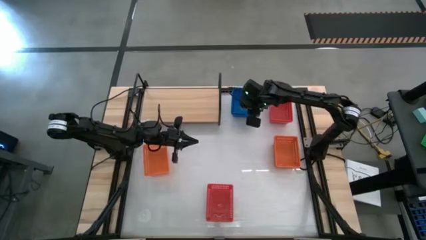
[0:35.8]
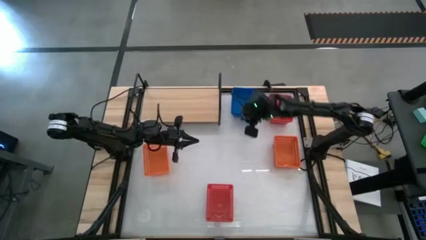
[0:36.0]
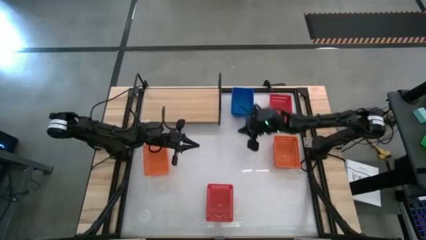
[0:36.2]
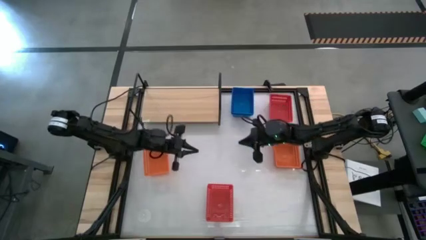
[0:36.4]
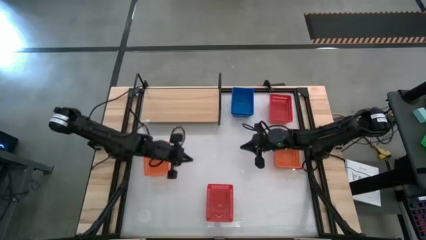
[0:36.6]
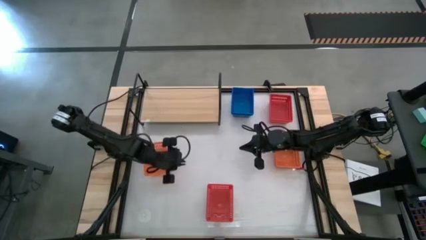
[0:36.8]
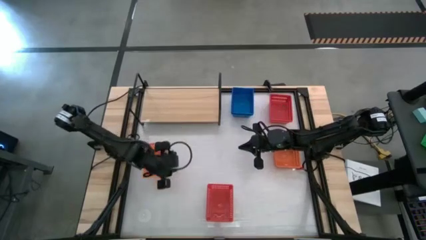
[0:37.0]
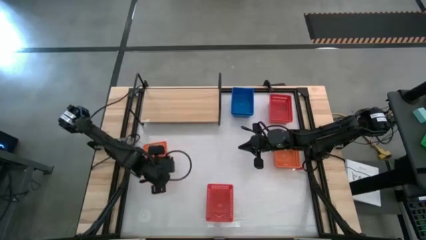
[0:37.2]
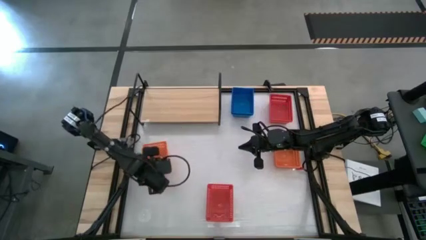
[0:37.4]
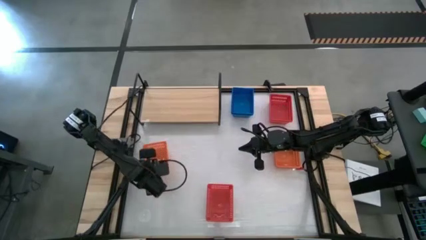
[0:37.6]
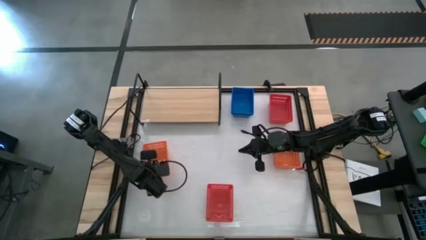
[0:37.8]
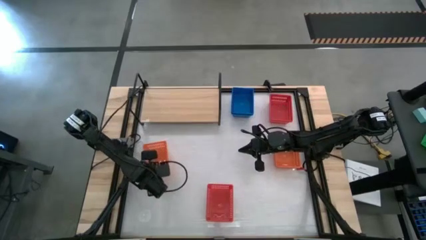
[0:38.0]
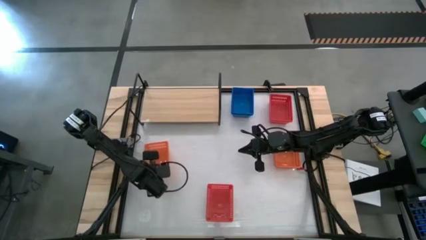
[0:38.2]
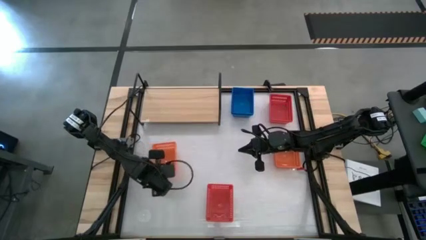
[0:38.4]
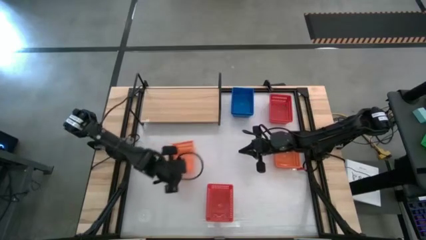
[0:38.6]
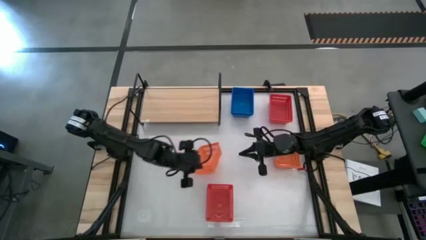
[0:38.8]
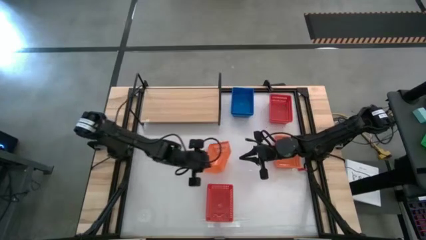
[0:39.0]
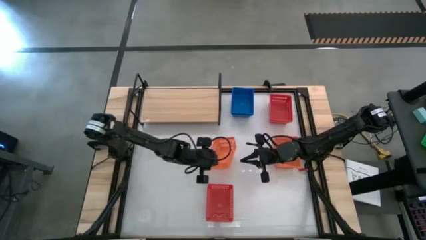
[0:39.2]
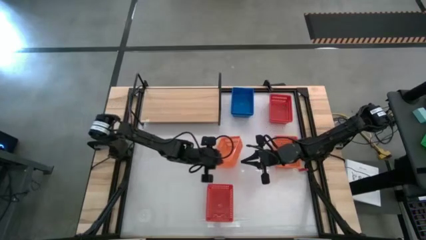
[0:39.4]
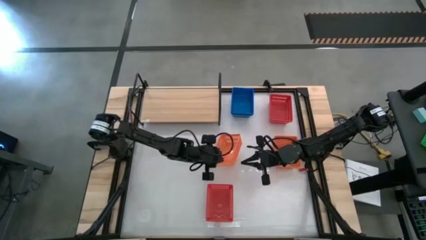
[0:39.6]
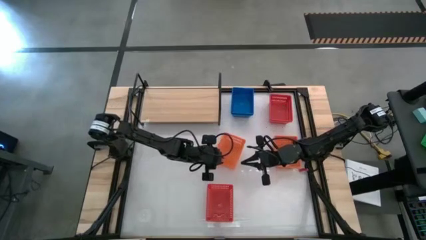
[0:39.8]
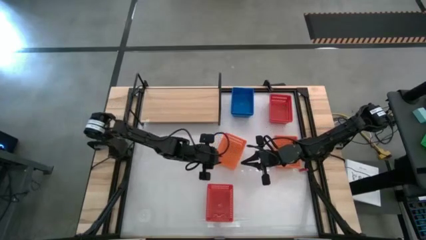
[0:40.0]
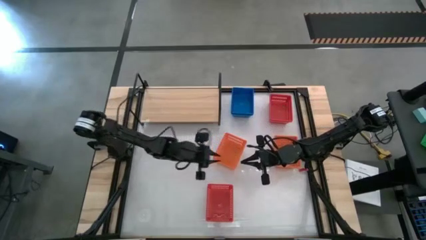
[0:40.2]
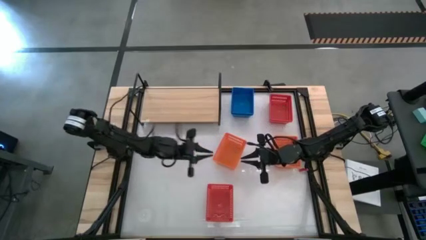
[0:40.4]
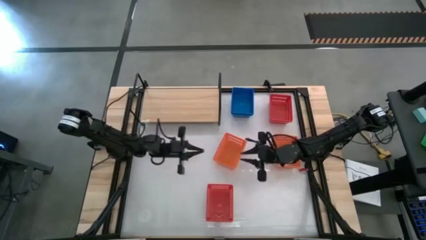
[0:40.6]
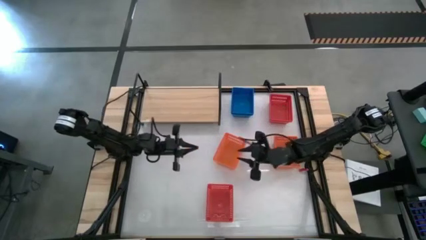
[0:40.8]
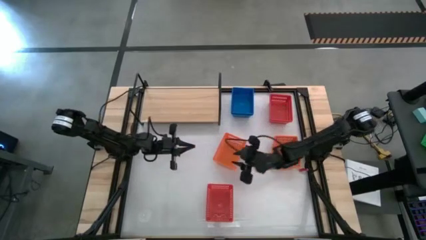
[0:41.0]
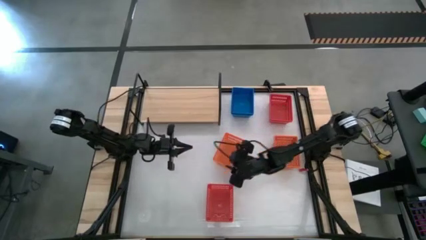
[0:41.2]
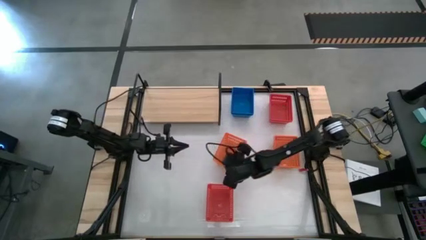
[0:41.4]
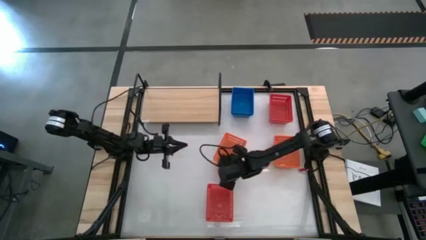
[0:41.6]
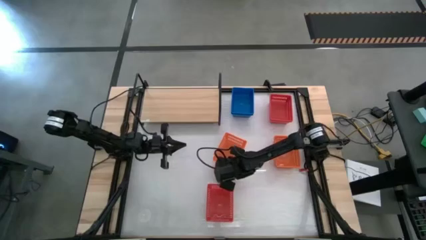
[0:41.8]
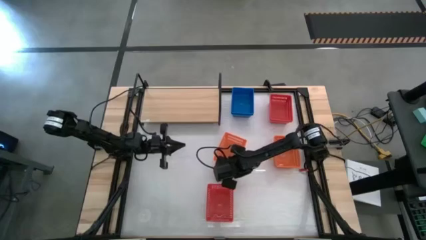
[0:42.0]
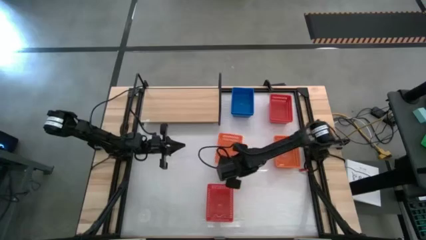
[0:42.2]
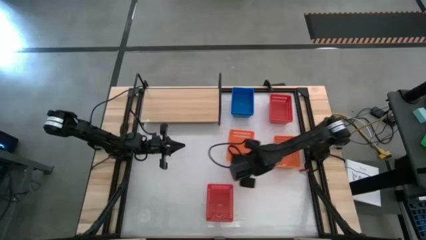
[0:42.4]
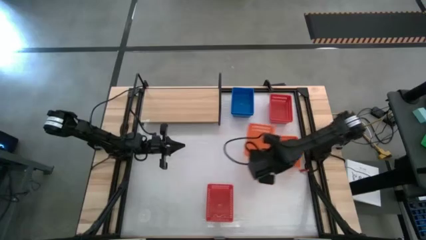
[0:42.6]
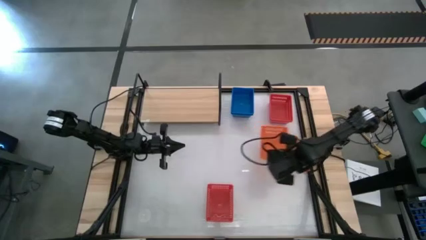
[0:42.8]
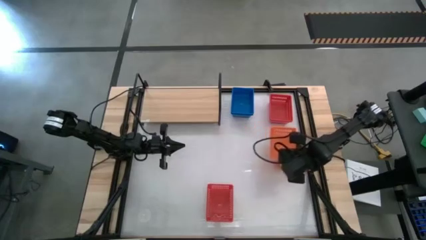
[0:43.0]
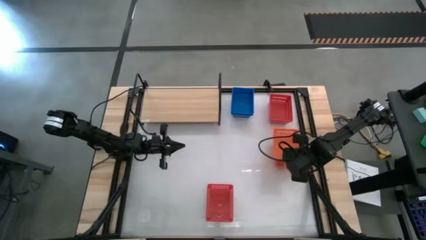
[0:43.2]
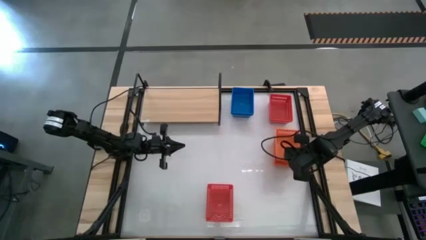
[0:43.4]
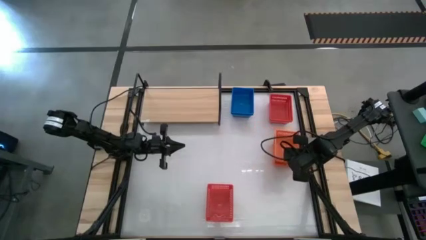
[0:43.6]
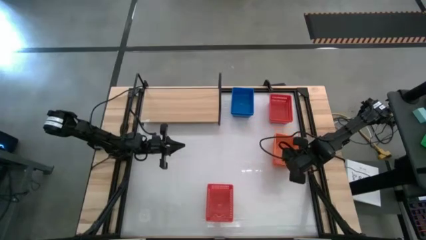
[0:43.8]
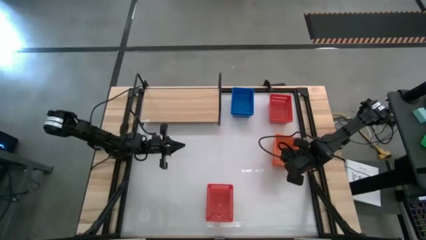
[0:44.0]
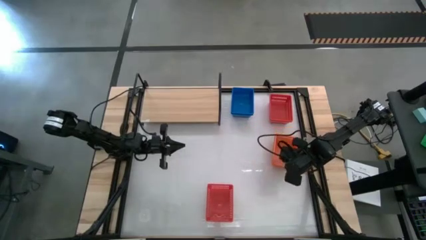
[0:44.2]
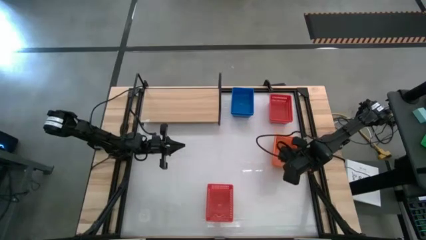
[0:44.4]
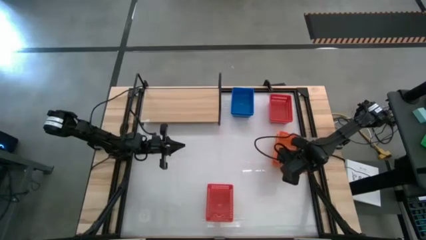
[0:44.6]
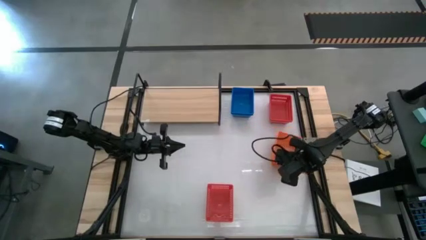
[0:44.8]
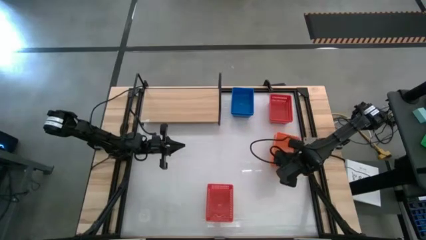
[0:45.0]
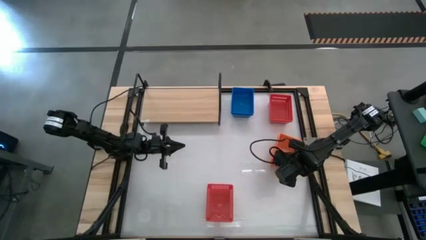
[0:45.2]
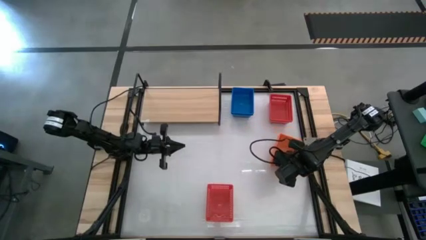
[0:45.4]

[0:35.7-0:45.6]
Task: Stack baskets on shelf by color
Stack the left orange bin on top of the right orange bins

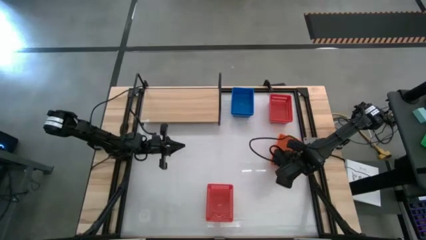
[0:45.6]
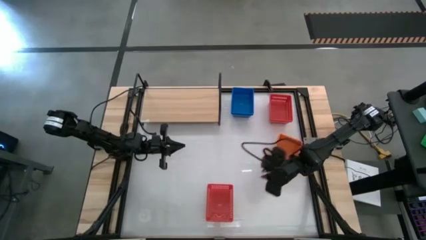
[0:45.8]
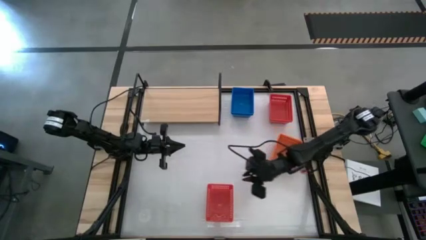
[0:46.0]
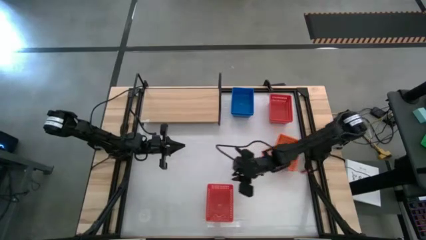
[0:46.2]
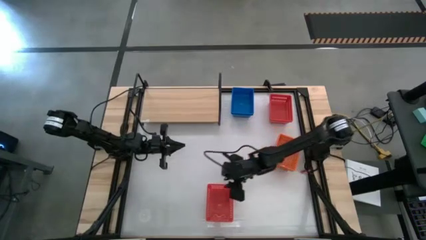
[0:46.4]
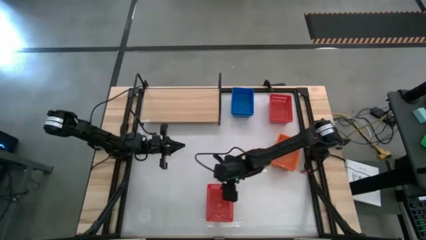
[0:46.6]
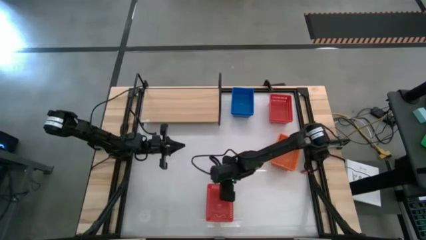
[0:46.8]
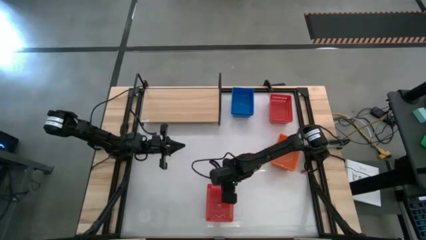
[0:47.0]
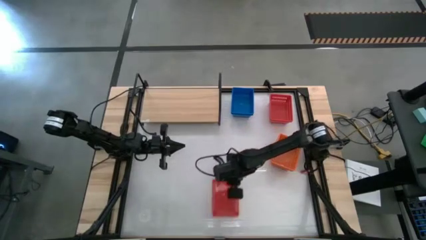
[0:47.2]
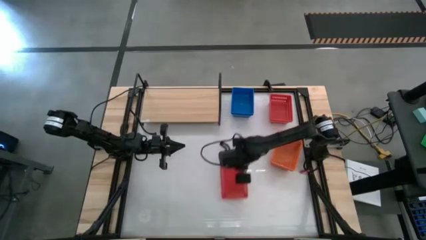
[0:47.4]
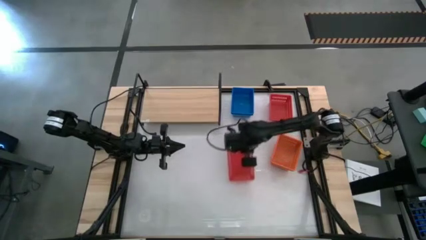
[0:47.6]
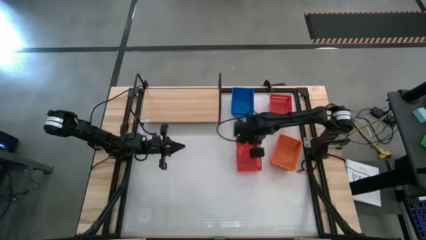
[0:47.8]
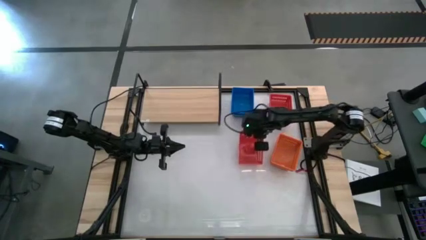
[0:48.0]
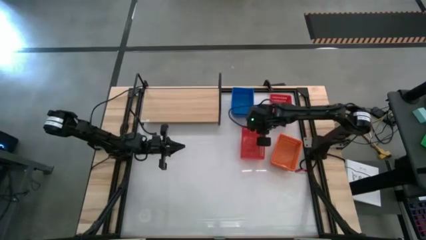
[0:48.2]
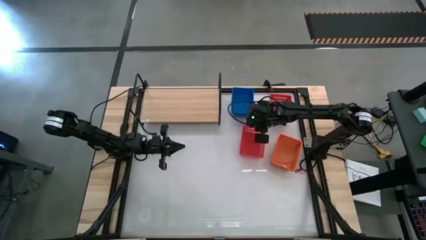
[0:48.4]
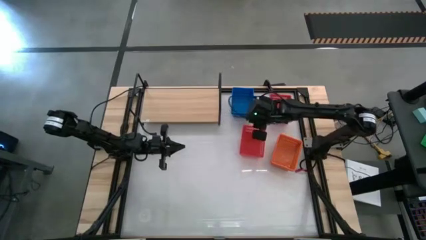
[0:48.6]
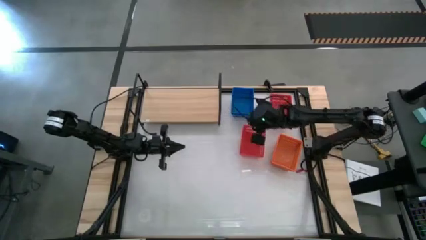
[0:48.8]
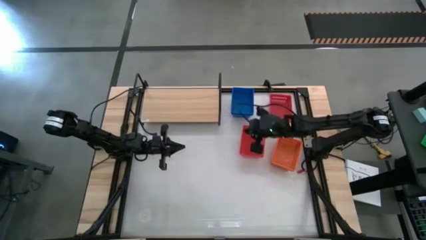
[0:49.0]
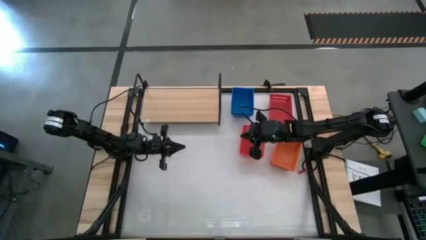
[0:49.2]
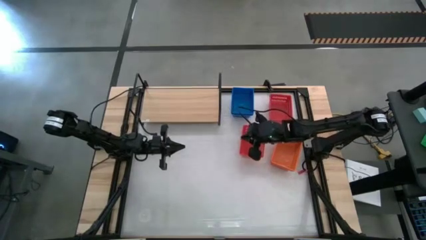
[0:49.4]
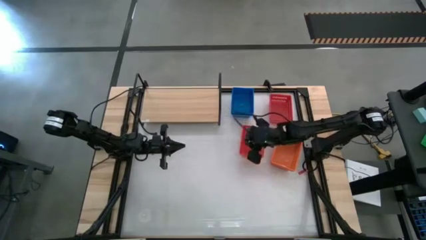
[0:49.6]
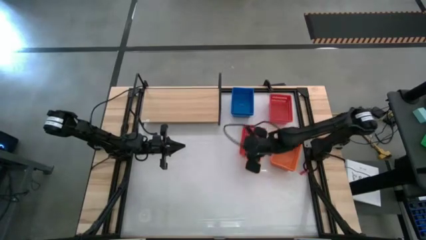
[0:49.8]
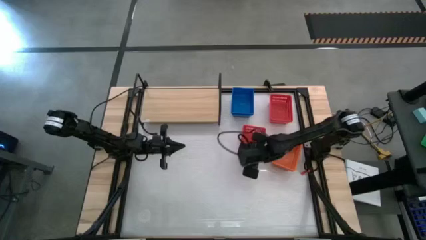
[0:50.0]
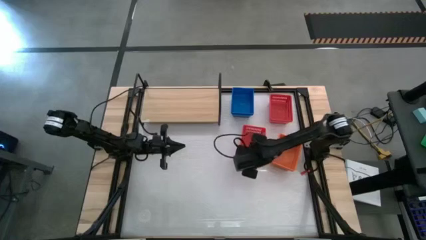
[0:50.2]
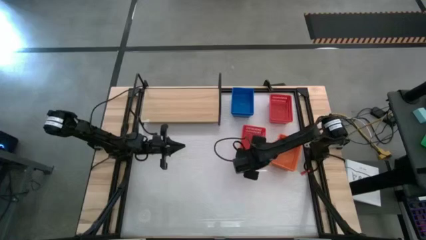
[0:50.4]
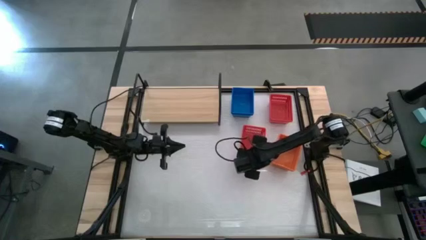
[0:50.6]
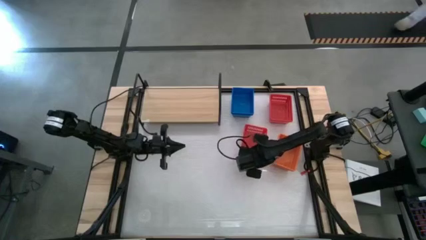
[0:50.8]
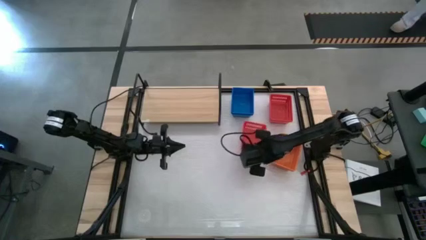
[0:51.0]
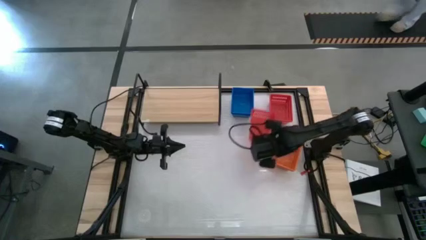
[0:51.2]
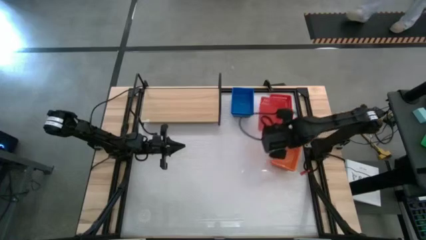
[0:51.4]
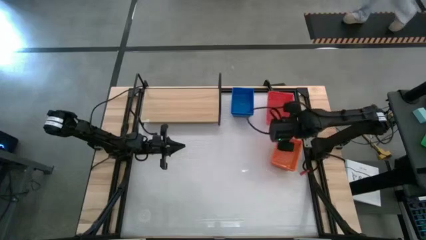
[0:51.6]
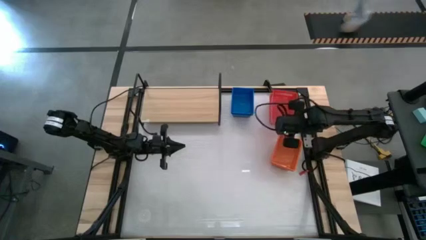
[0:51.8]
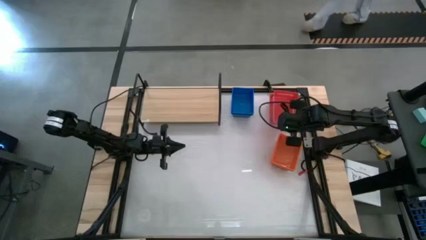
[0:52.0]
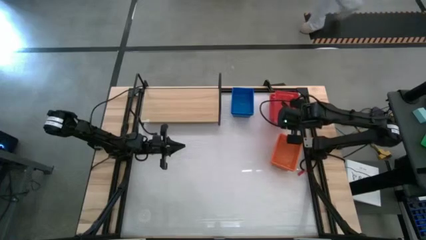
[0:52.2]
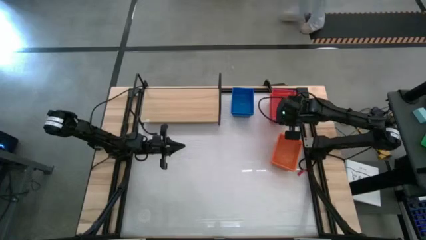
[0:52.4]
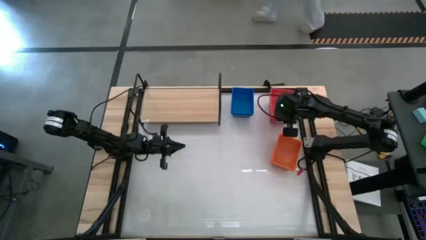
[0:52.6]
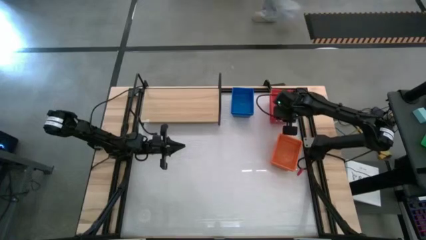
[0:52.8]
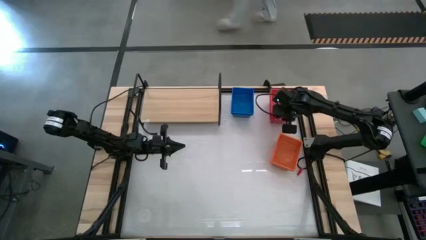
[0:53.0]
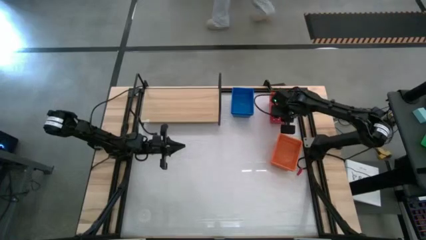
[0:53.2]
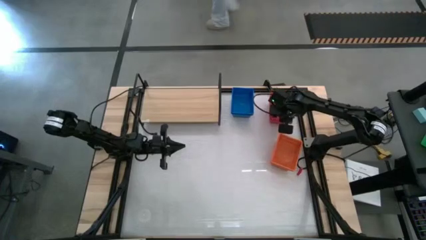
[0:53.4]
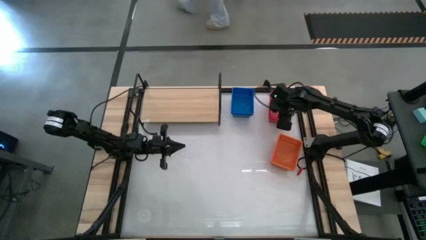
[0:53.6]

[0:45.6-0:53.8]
Stack the bottom red bin on top of the top red bins
